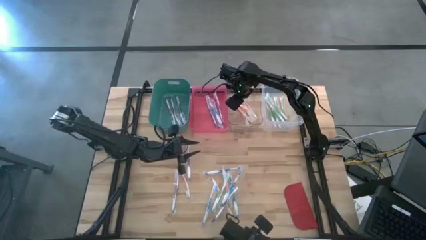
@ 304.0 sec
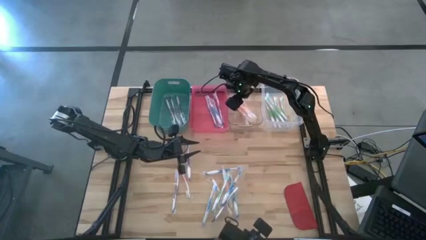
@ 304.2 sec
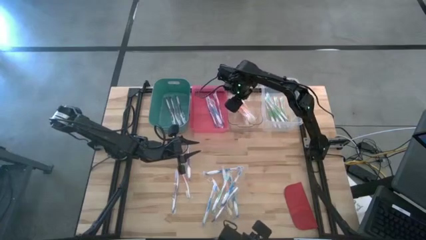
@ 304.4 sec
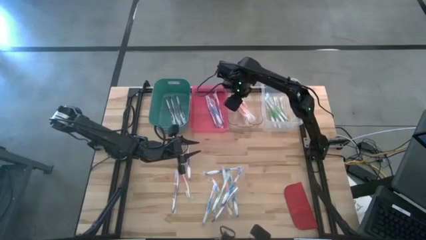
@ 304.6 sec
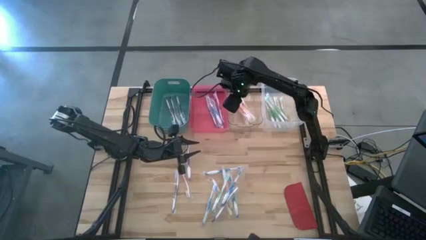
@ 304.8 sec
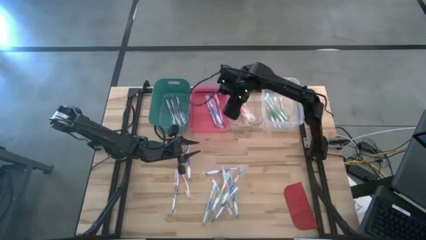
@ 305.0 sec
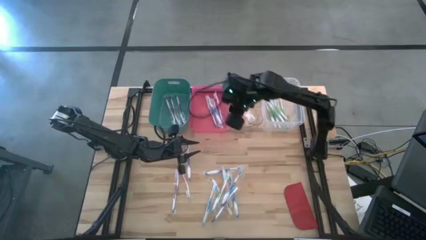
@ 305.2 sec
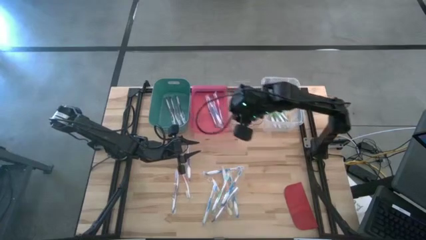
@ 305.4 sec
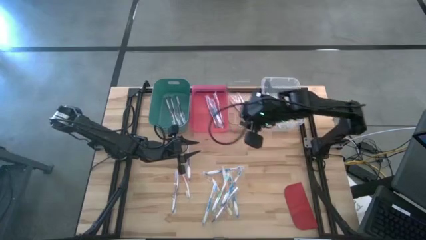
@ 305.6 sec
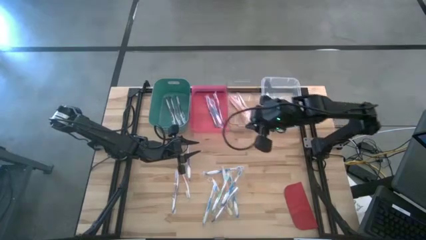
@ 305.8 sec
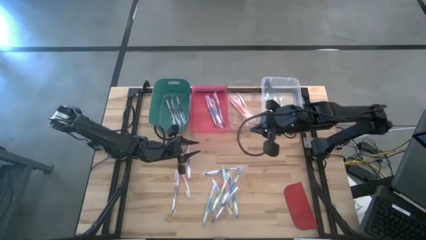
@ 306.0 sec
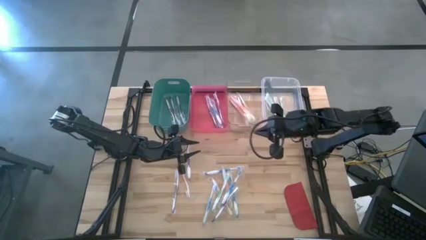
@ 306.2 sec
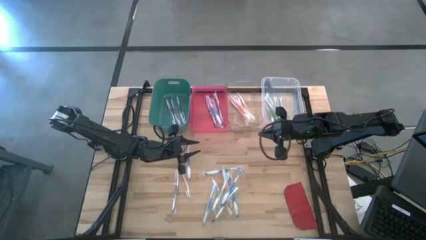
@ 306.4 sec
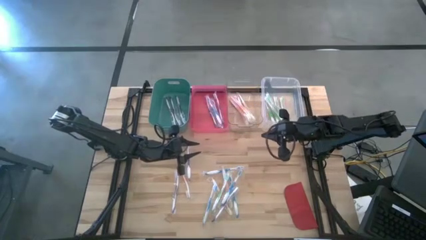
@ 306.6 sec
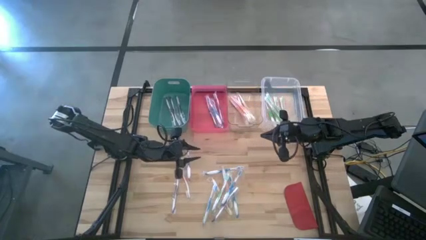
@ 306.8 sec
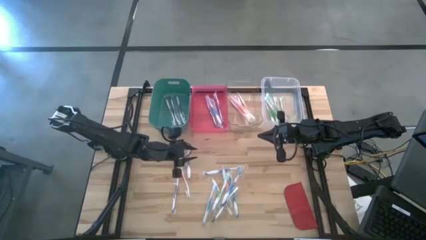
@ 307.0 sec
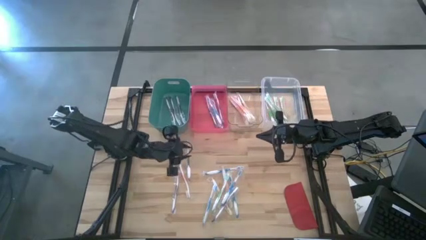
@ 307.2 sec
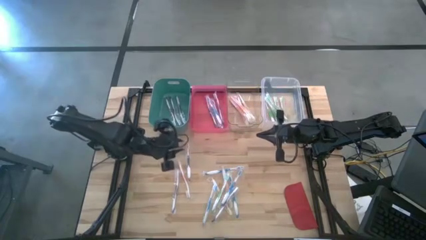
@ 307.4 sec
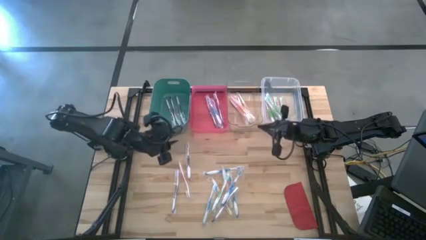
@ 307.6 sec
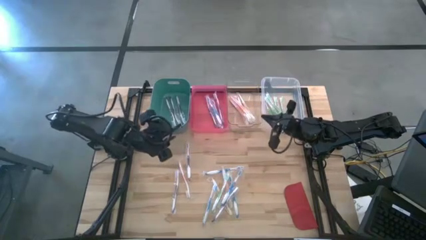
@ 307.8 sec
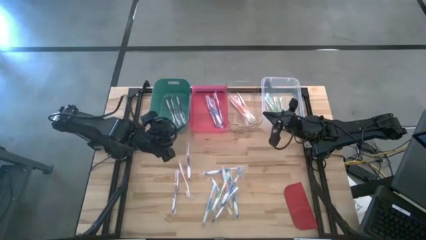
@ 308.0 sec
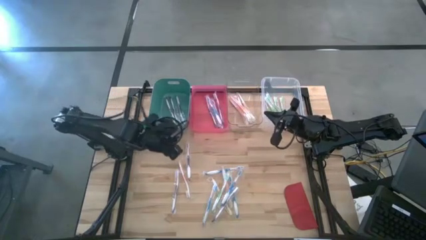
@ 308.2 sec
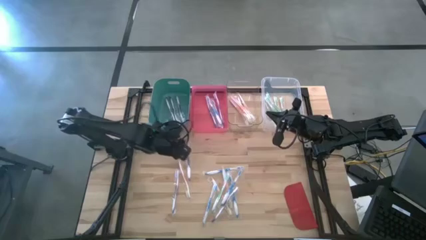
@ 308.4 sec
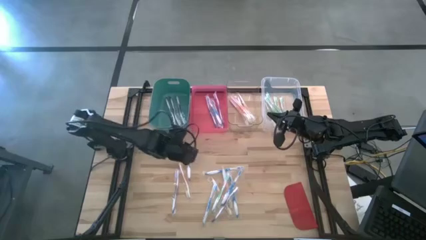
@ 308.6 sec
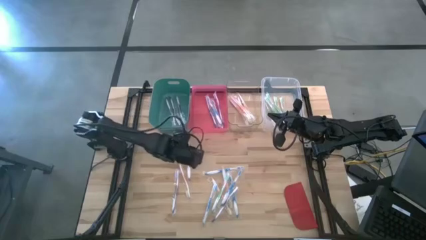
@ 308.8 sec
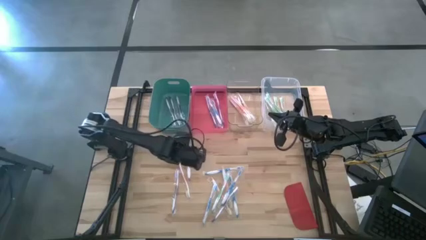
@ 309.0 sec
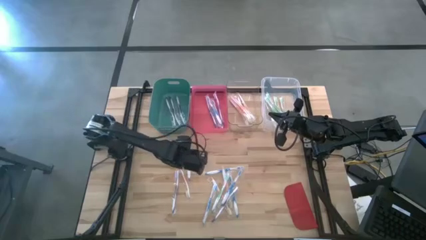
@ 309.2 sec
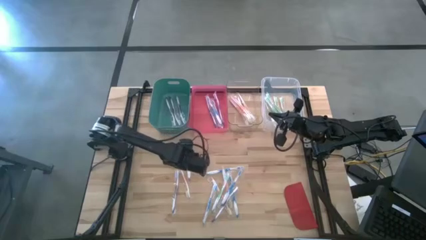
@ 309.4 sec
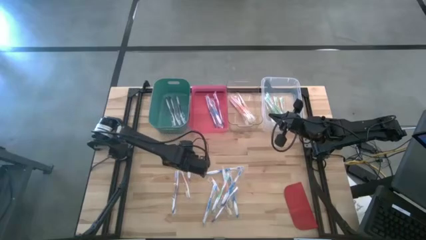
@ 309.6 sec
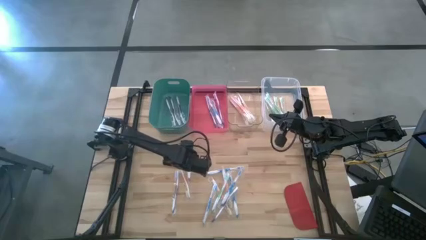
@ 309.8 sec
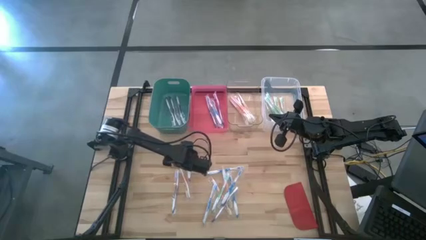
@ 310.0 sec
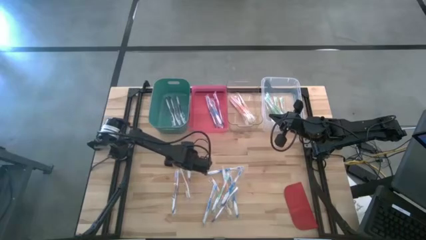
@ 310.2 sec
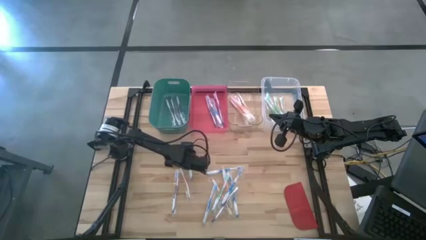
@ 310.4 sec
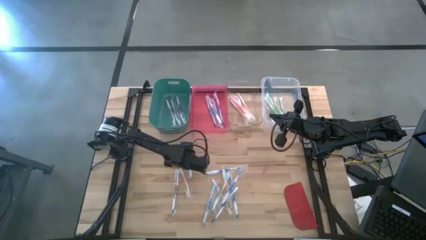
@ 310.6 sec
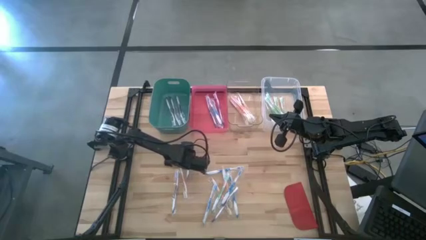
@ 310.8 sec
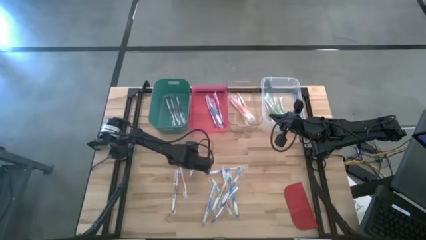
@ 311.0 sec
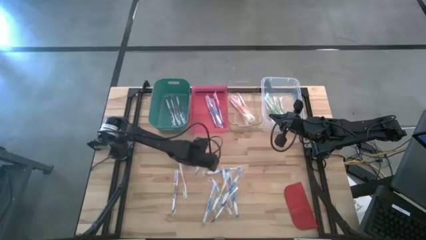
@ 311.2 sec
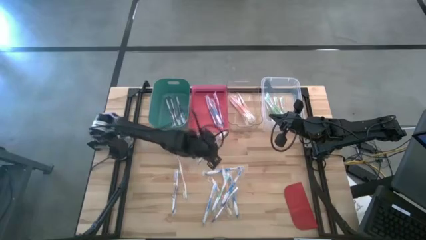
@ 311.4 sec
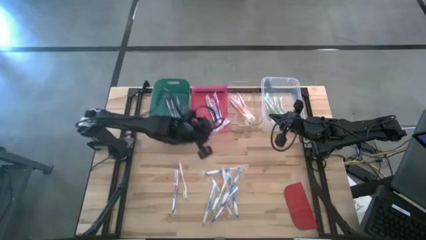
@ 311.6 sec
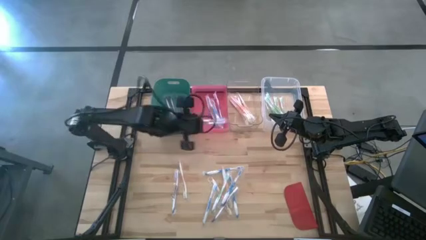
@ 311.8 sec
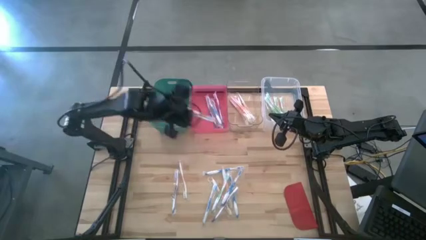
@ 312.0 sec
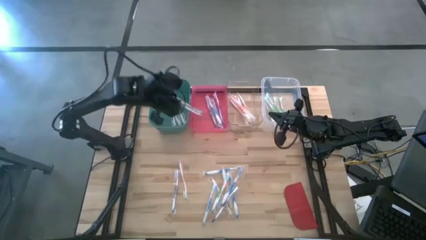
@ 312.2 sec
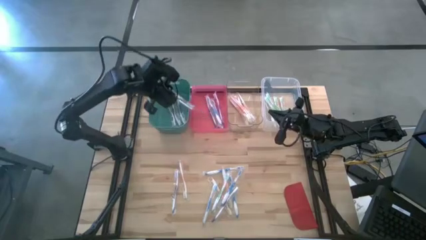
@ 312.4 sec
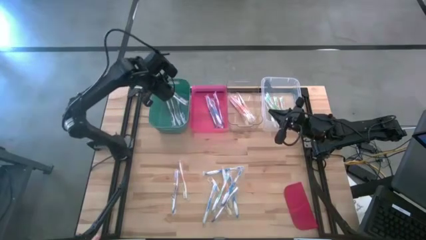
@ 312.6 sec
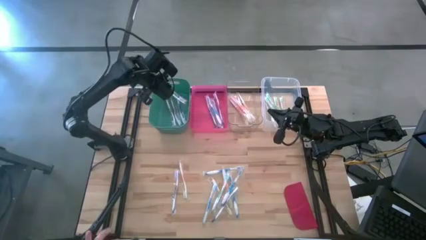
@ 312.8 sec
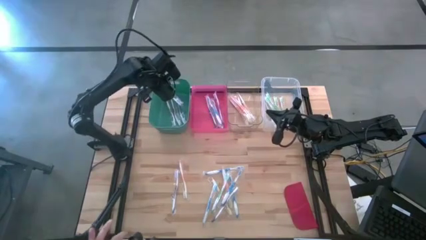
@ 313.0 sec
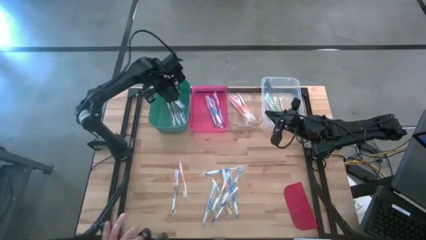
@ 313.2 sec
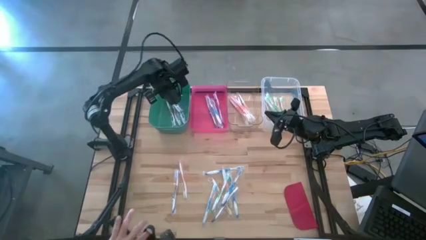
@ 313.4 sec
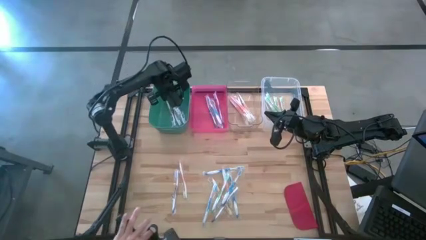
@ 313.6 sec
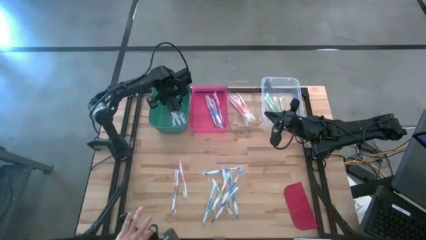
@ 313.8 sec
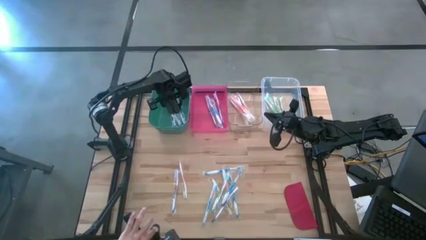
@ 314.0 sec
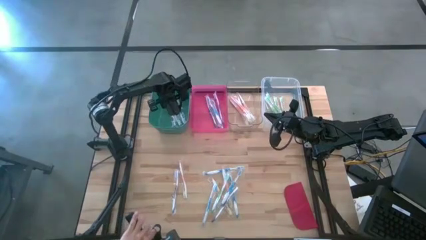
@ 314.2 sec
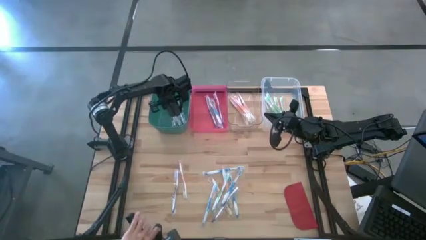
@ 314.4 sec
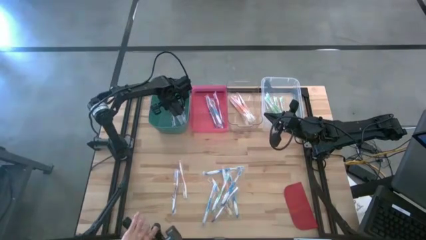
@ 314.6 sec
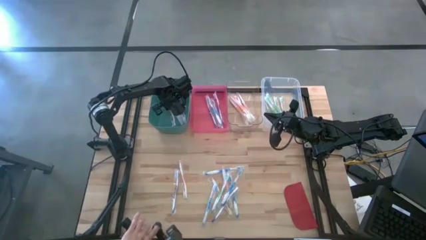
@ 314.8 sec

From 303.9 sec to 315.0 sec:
Task: Pick & Place Toothbrushes
Put the violet toothbrush into the green bin

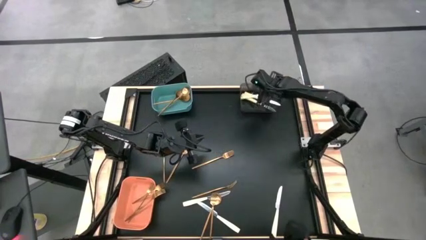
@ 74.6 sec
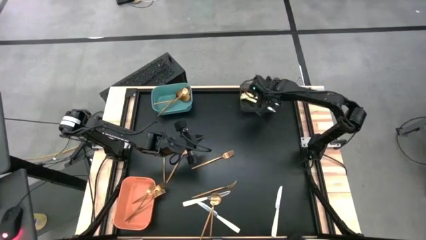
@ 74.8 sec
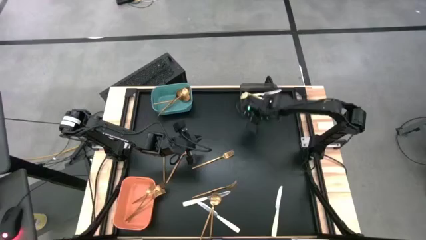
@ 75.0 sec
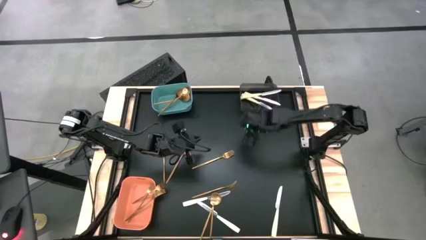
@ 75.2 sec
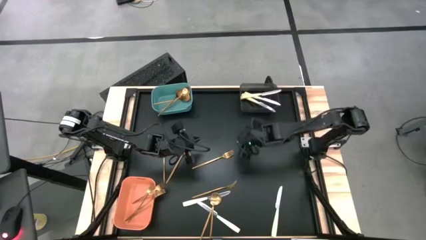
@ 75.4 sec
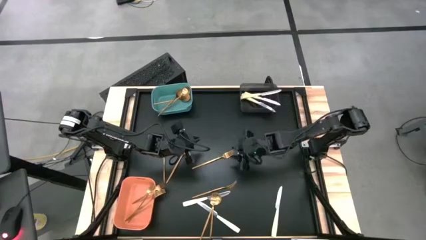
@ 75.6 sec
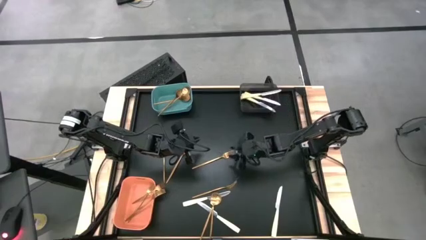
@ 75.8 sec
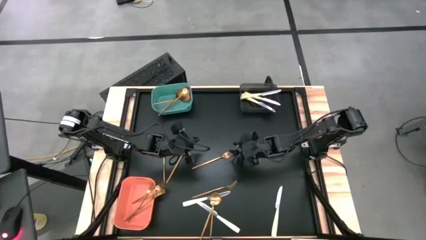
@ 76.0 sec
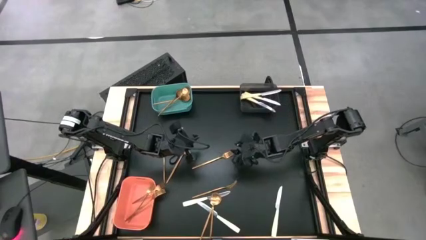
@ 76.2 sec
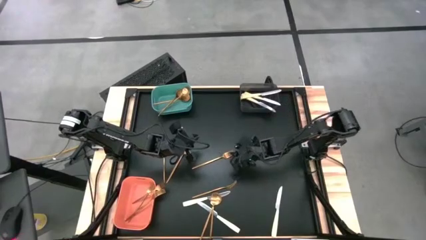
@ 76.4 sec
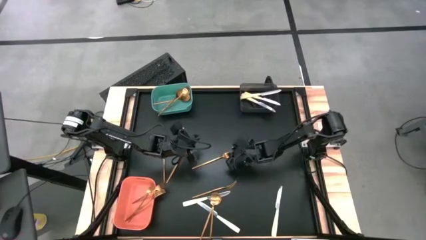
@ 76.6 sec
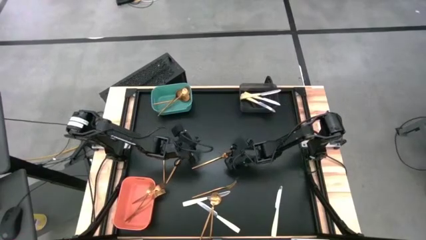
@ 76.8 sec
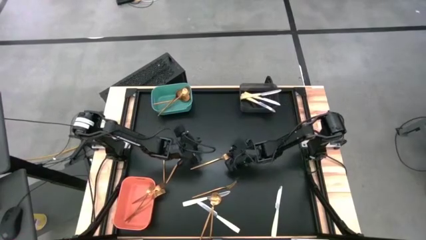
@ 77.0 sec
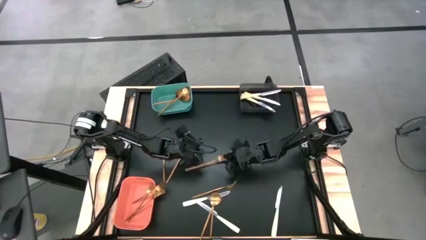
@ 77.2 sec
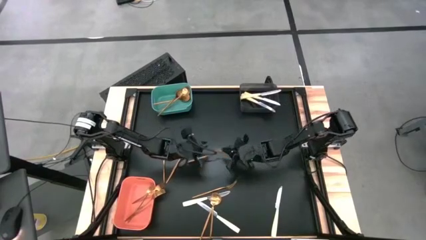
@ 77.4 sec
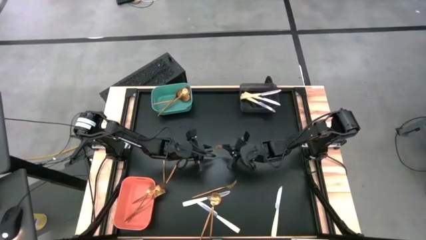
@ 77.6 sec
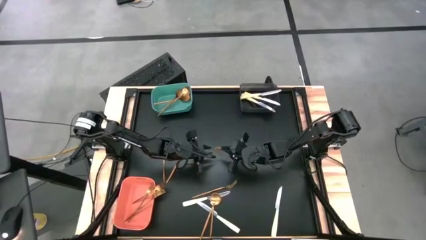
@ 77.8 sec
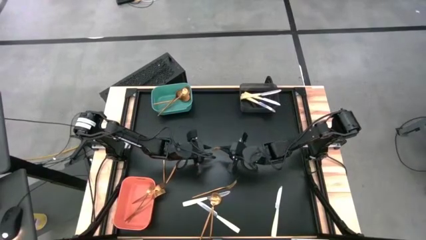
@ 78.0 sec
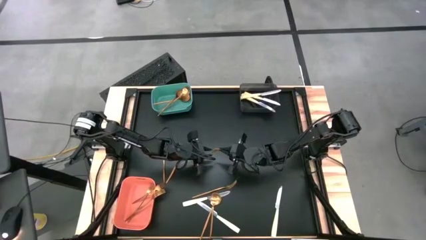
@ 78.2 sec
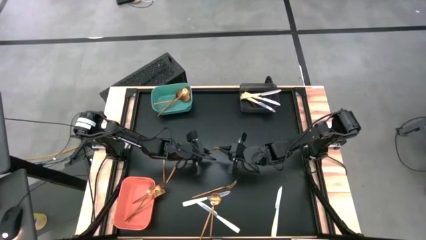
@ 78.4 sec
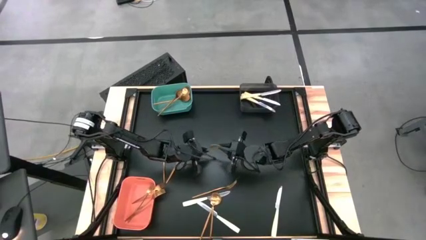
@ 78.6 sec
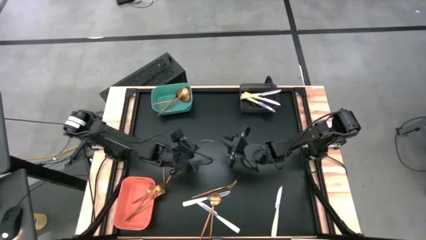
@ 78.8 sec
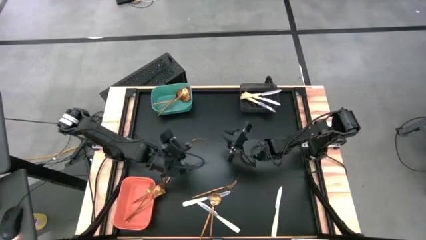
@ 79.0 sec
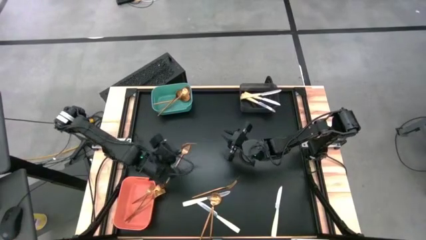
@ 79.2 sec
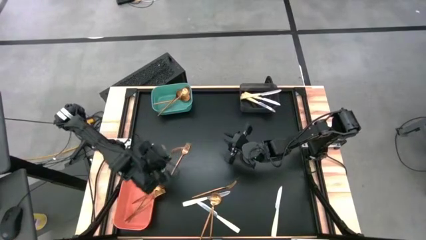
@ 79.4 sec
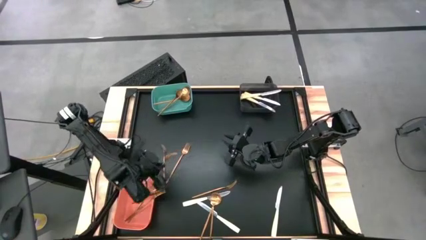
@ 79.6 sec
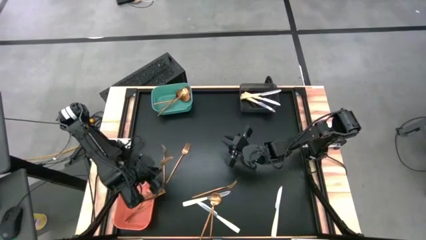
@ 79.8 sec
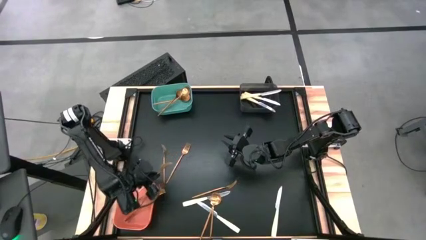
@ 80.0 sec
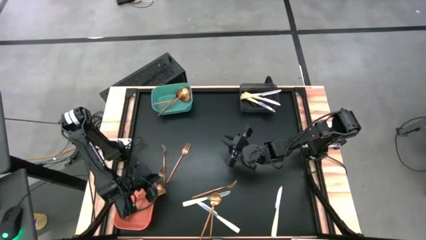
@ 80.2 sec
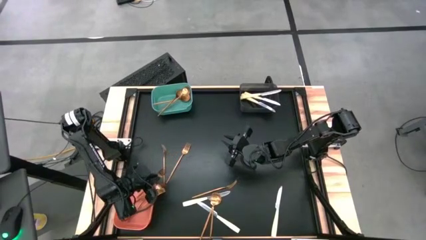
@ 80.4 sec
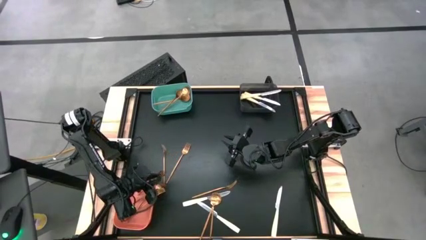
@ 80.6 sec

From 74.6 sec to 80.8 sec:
Task: Sort silverware by color (type)
Put the gold fork into the orange bin
